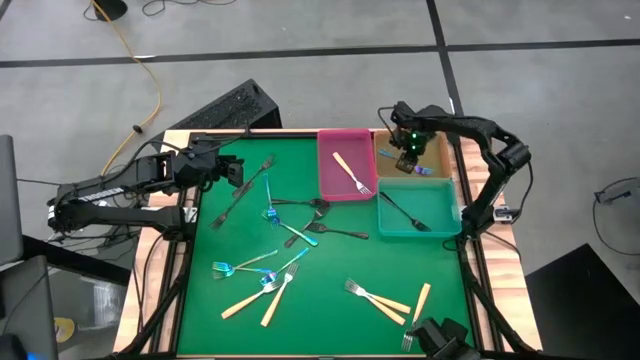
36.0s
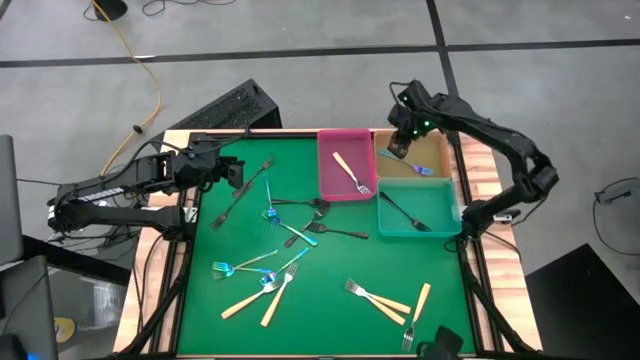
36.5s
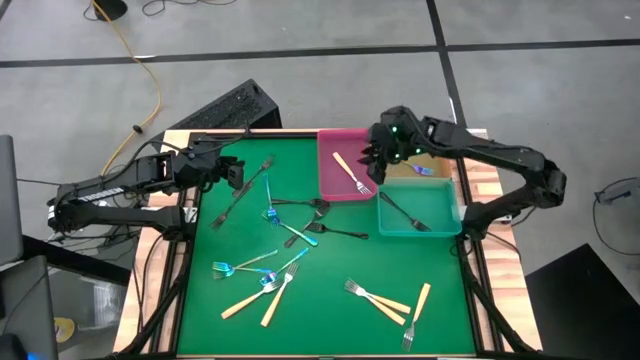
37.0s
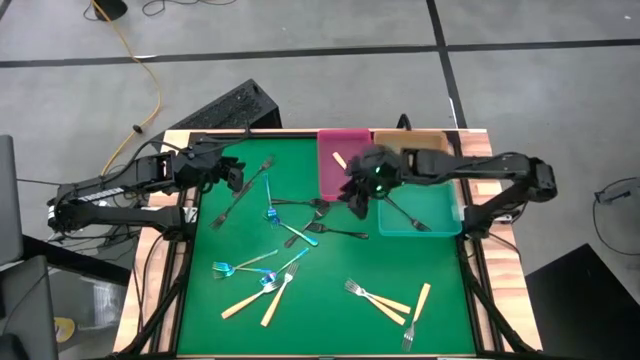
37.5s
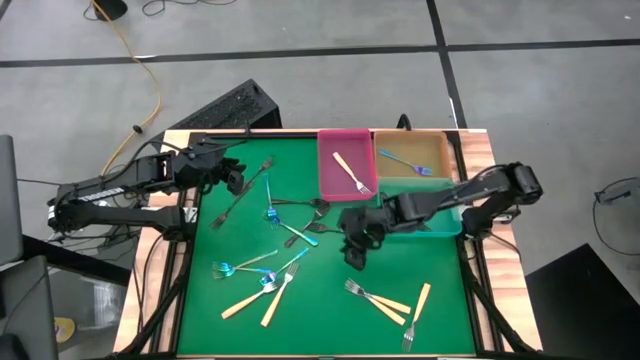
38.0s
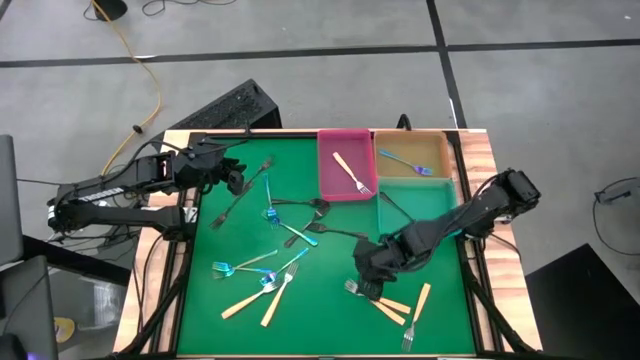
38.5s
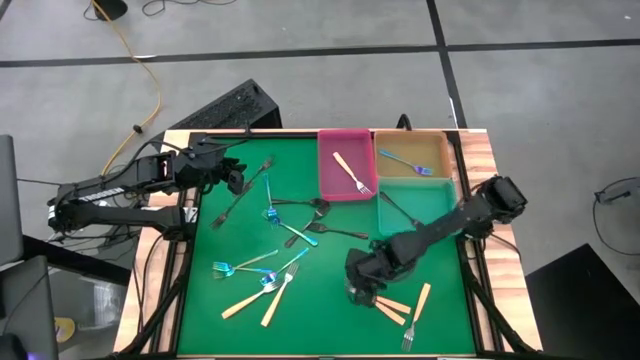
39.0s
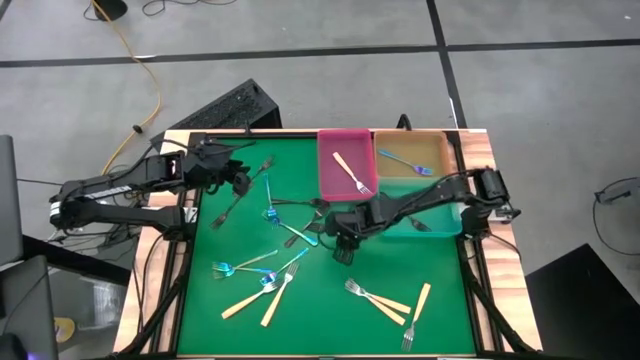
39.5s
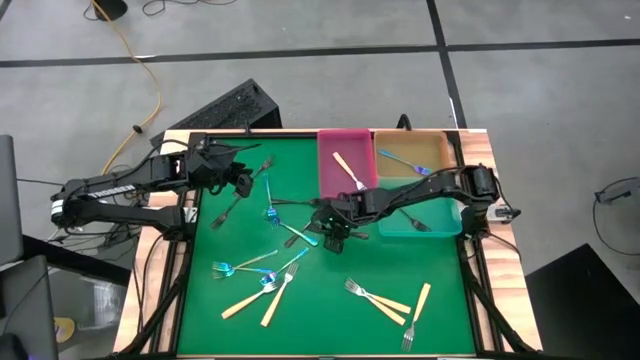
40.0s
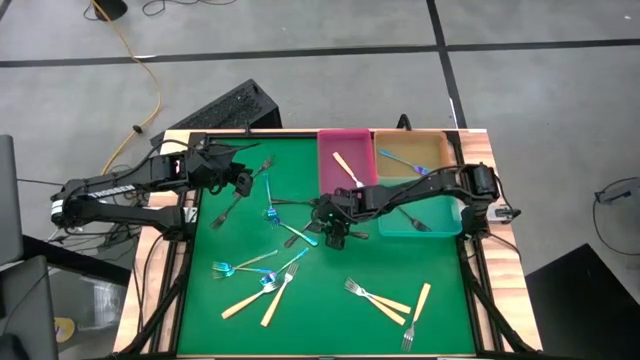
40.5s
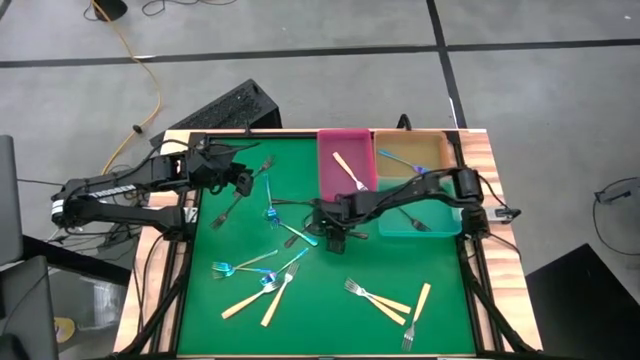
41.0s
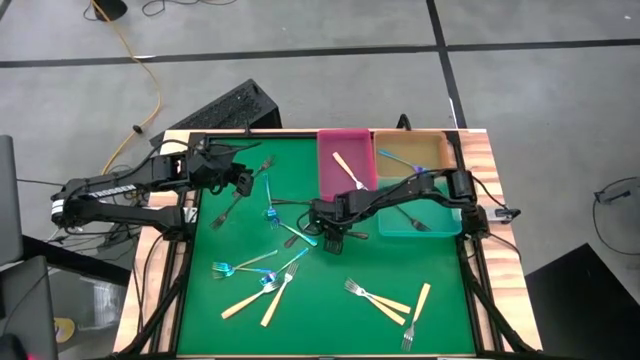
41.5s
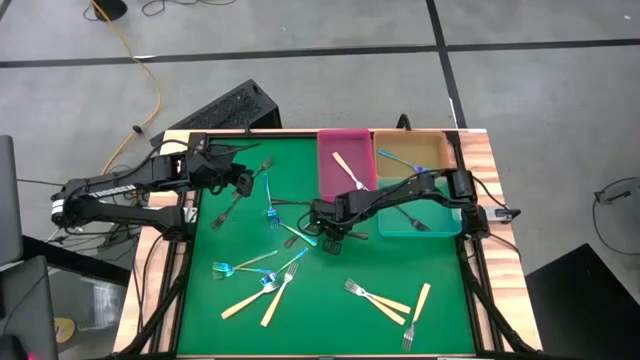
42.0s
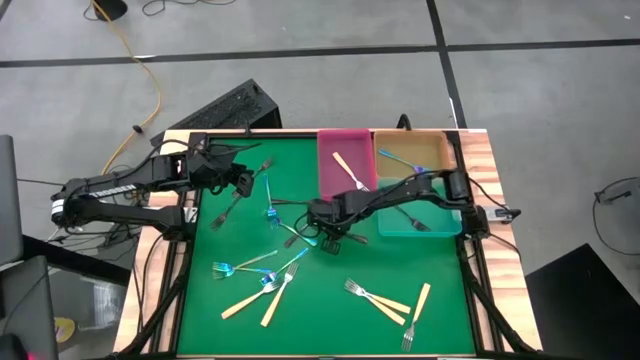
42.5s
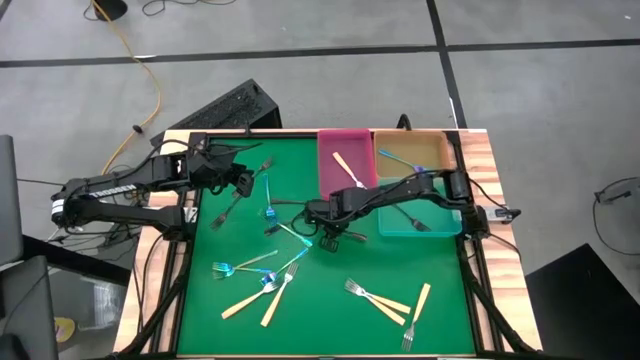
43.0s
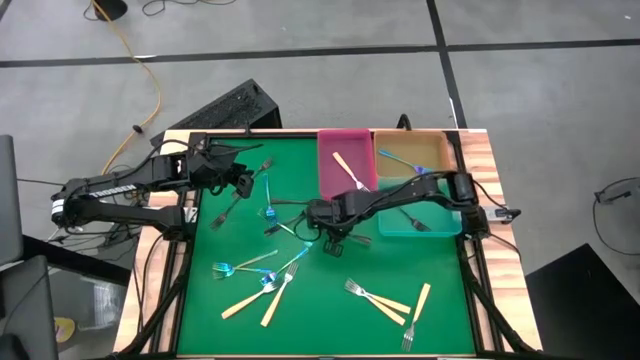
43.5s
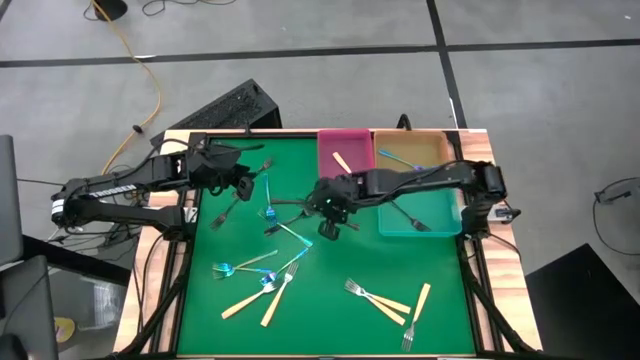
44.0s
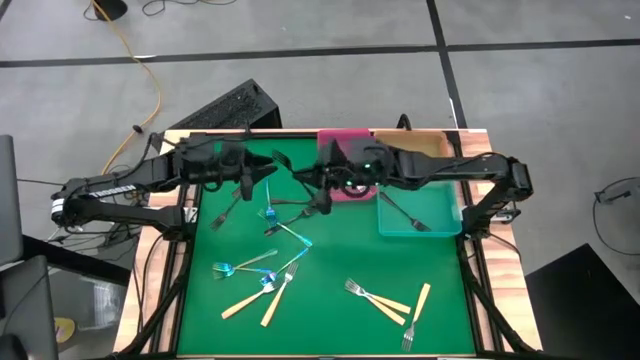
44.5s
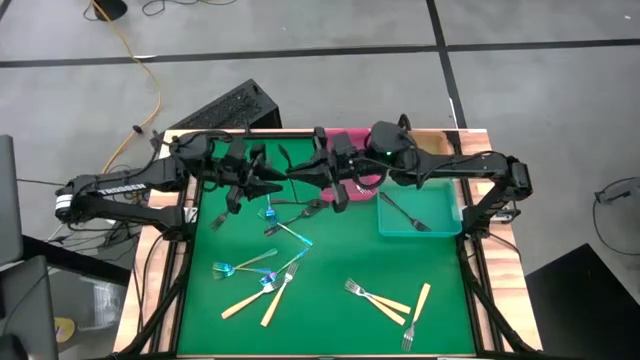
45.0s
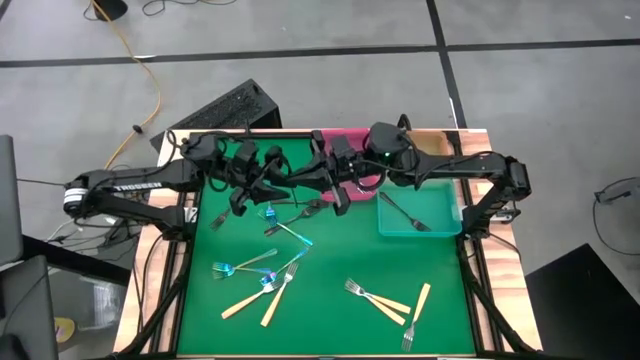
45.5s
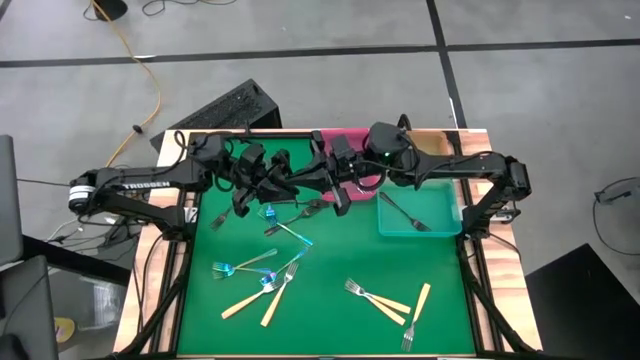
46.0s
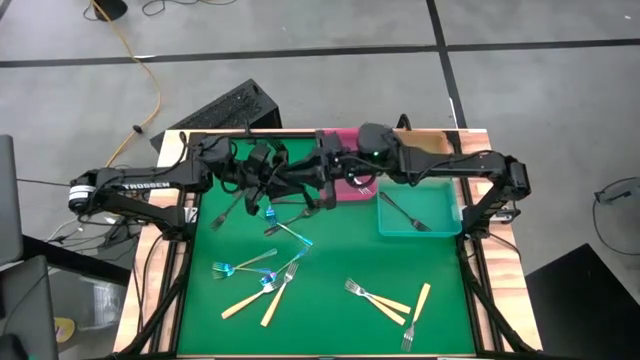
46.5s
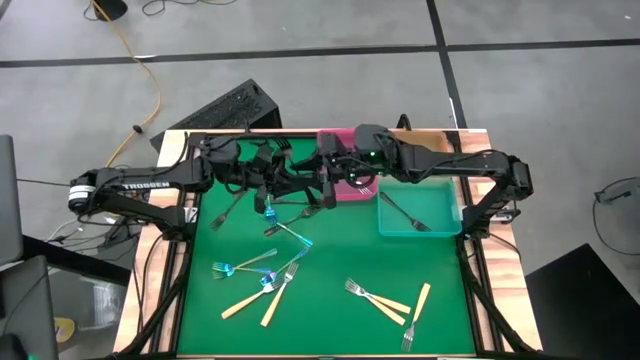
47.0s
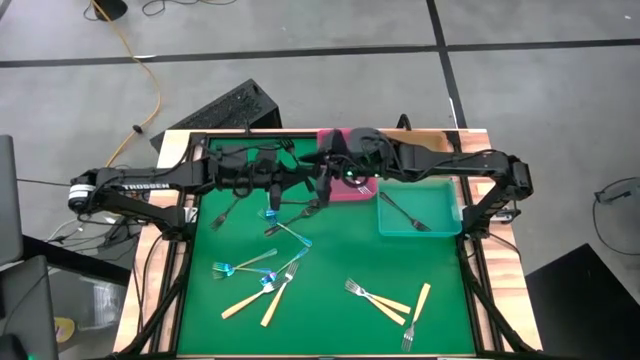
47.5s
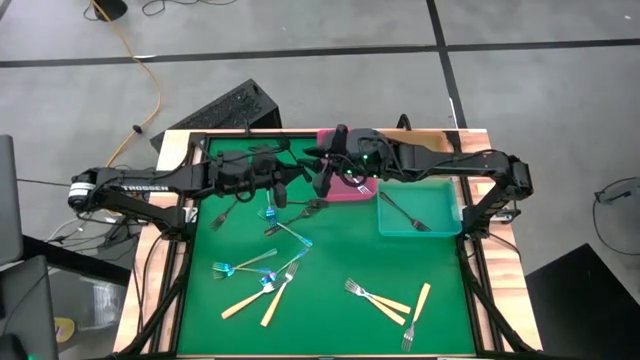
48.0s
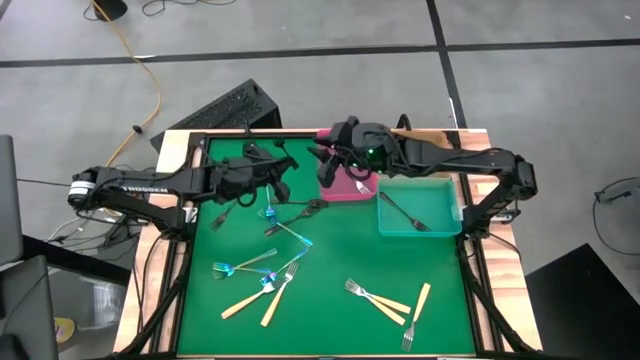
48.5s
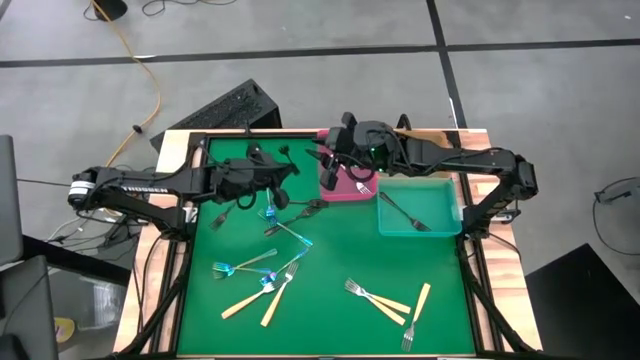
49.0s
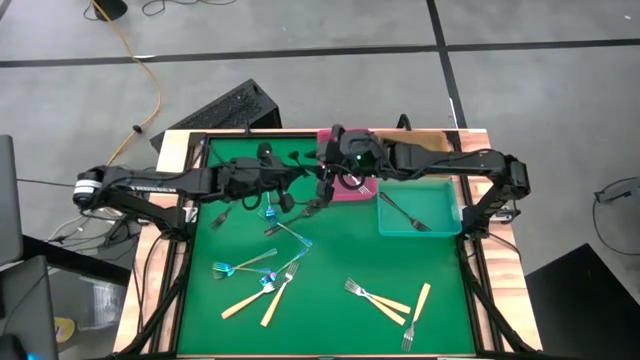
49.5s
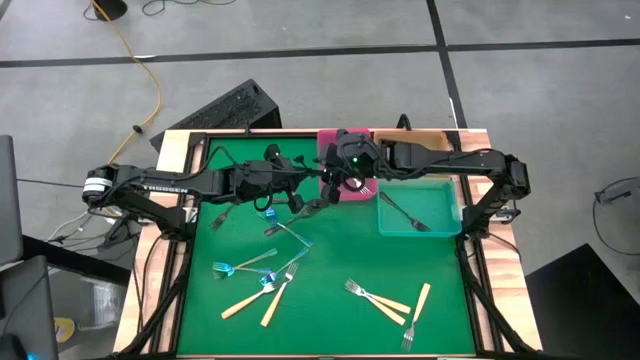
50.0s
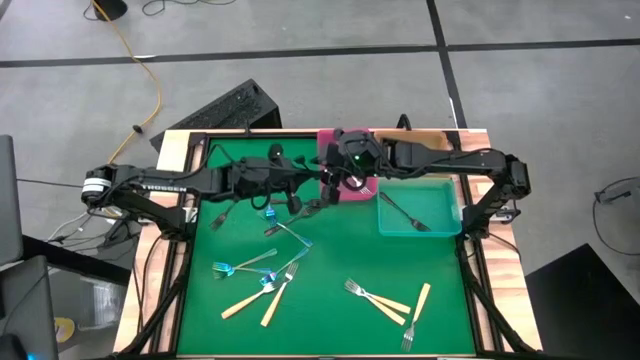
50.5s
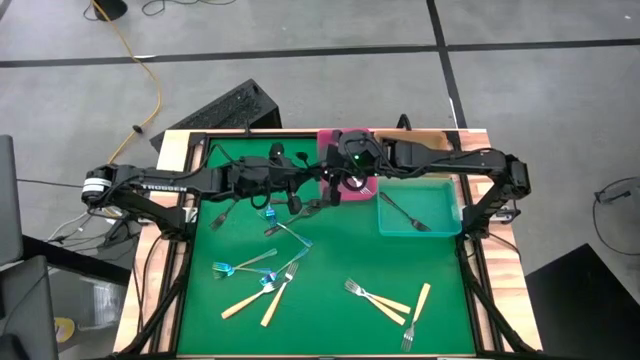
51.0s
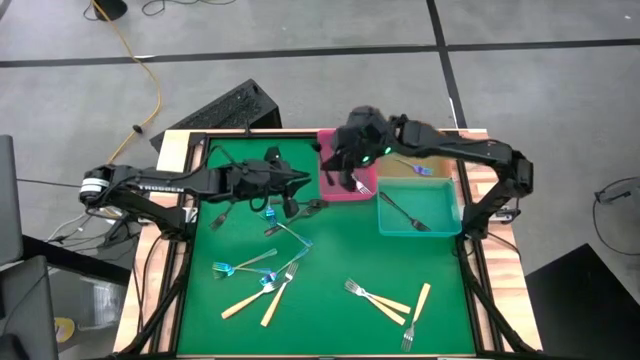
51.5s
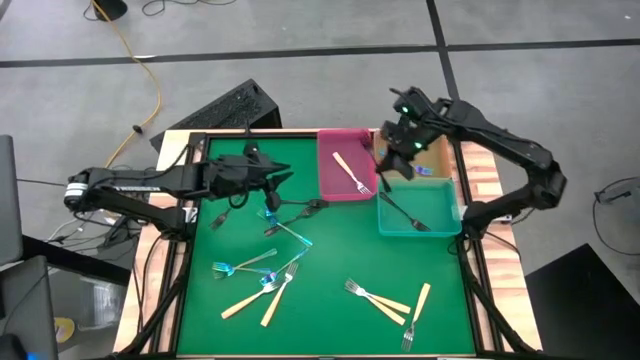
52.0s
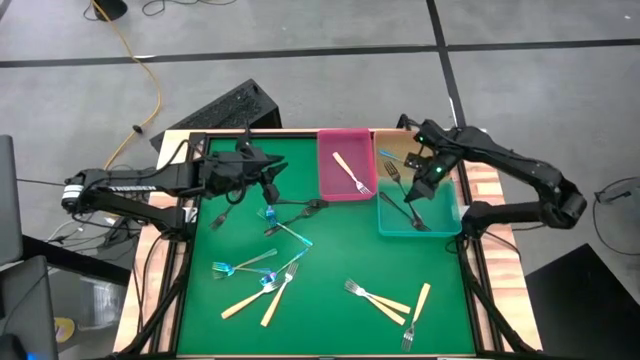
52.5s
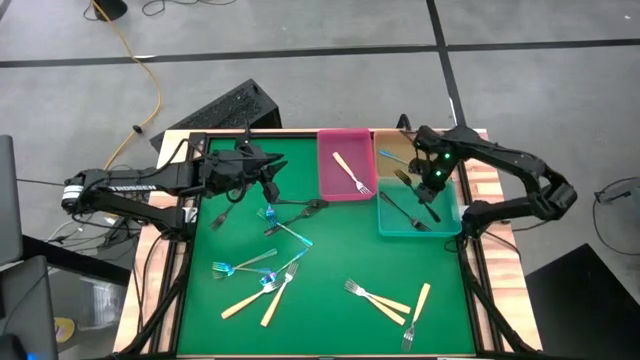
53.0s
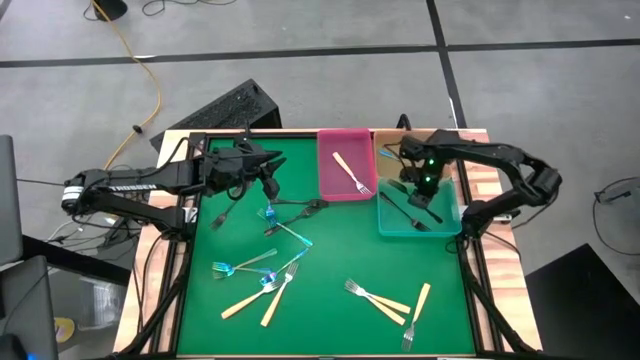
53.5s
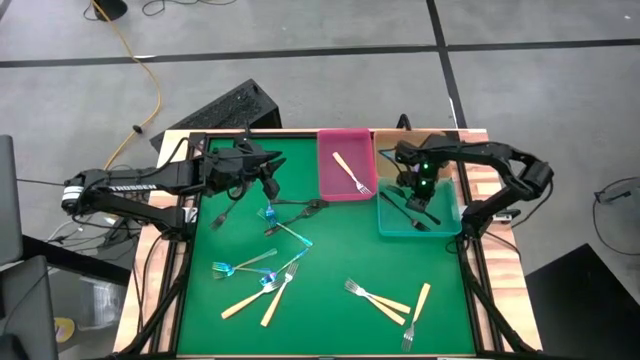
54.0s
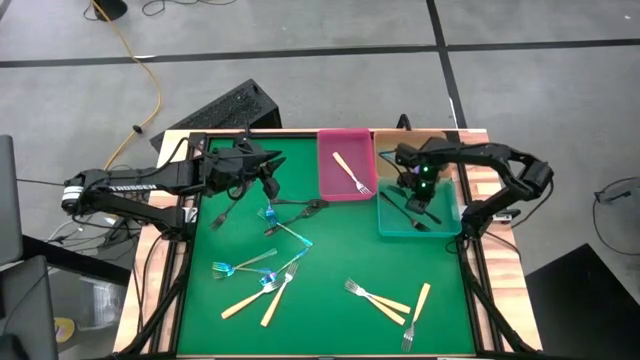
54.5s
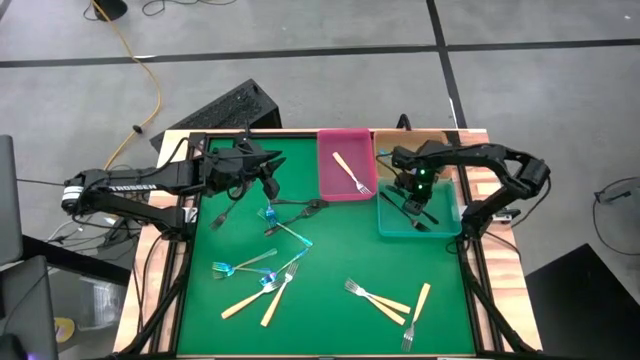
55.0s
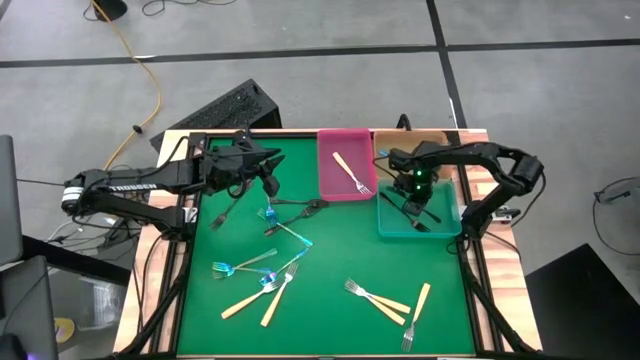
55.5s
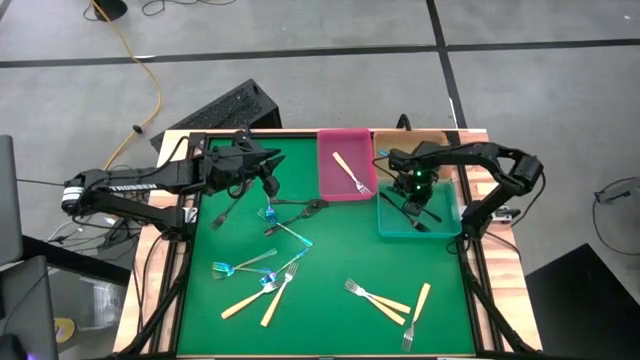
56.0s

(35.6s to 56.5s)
Task: Sort silverware by color (type)
Put the black fork into the blue bin
